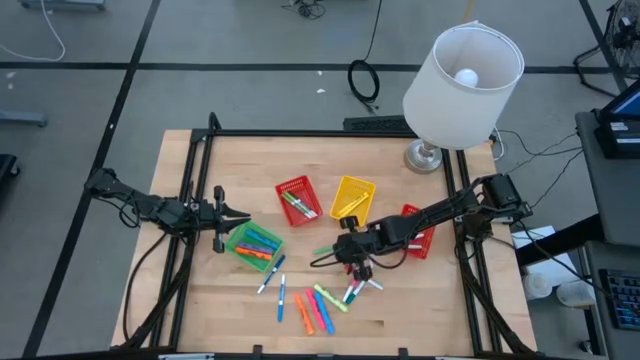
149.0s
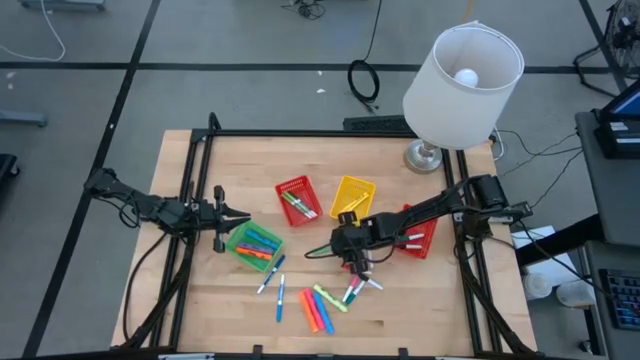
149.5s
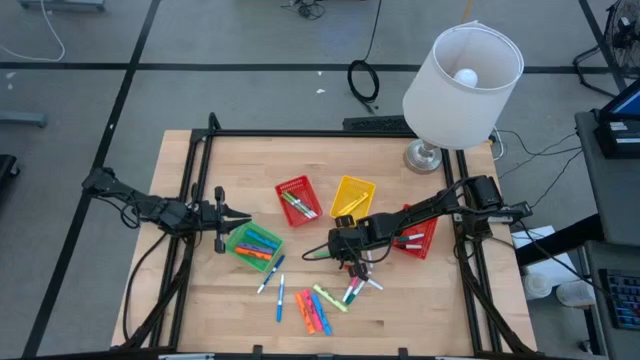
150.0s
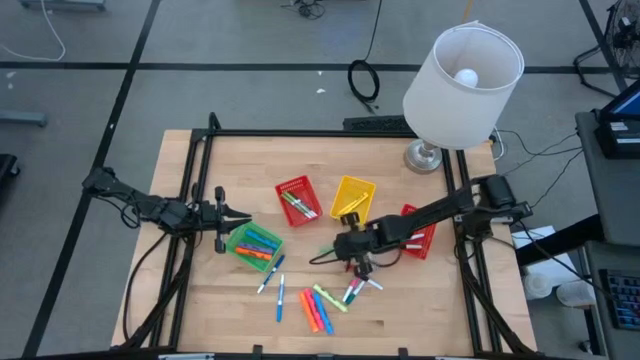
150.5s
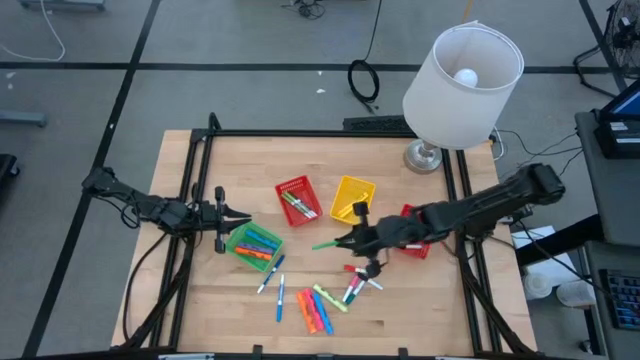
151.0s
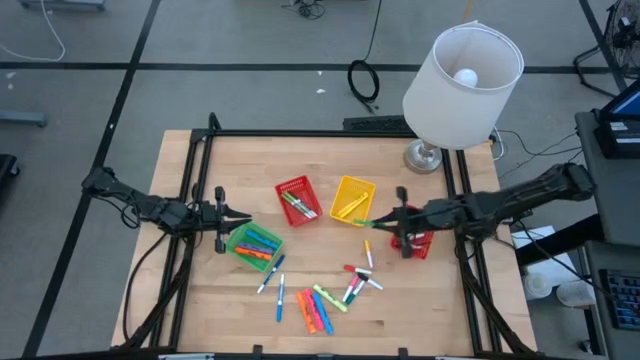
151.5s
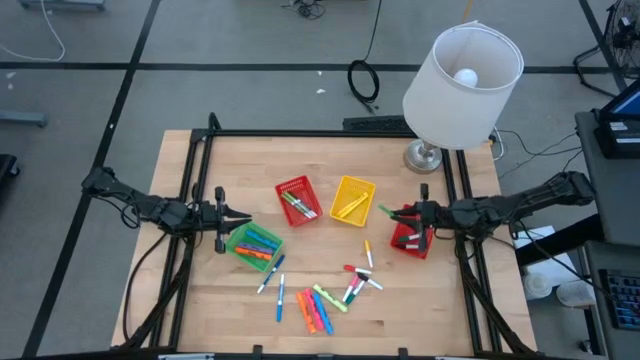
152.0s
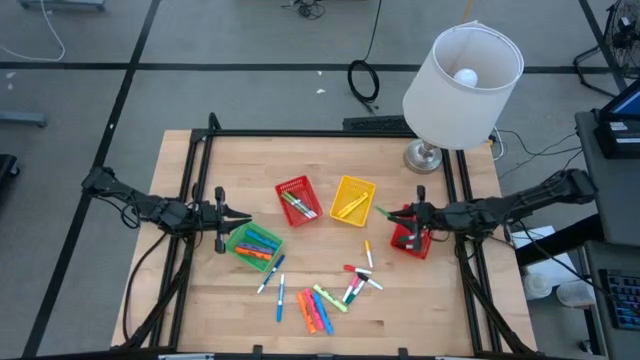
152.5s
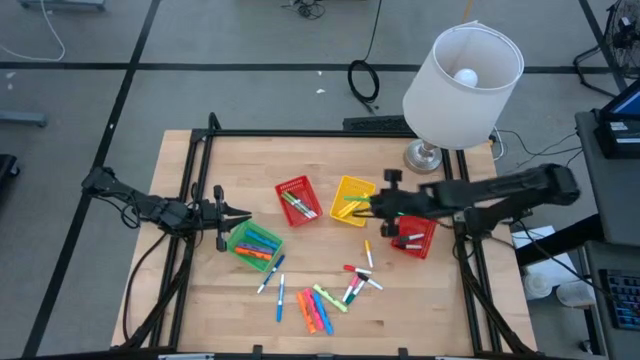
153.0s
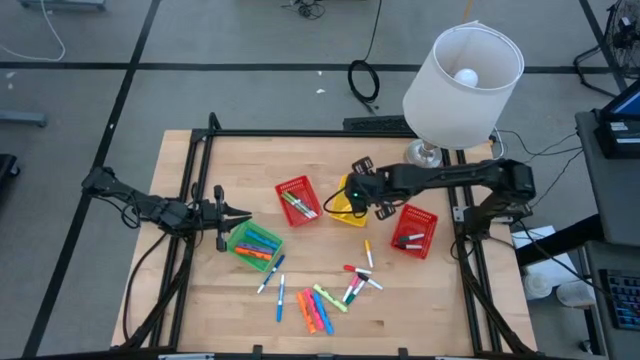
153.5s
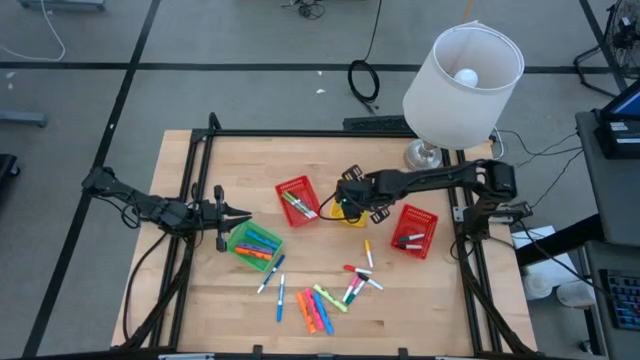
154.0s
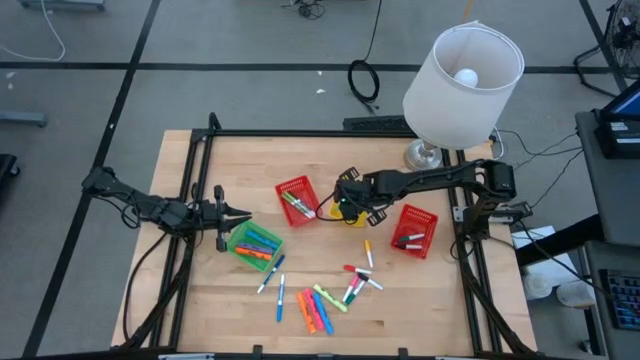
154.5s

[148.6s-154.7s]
Task: Pick & Place Markers
Put the green pen into the yellow bin

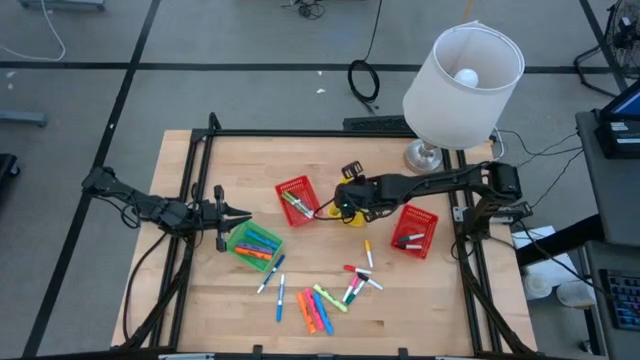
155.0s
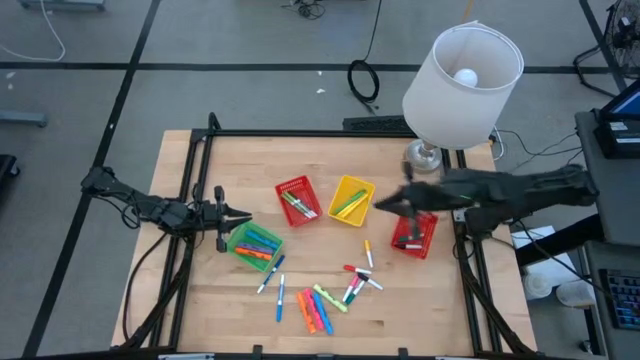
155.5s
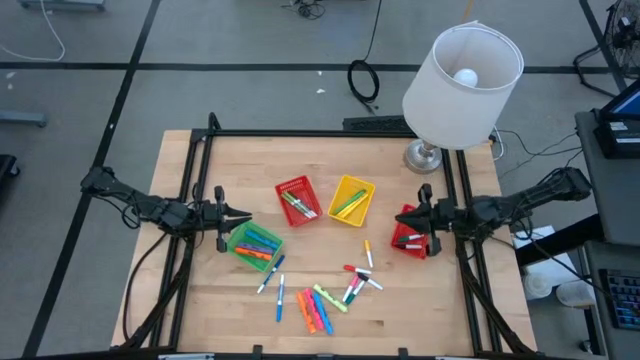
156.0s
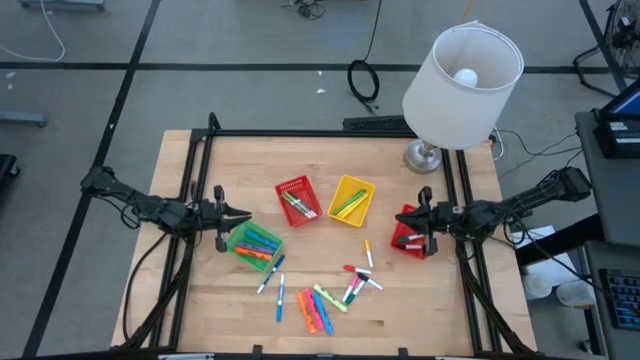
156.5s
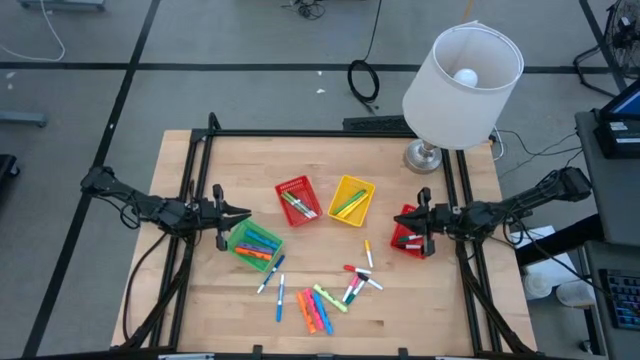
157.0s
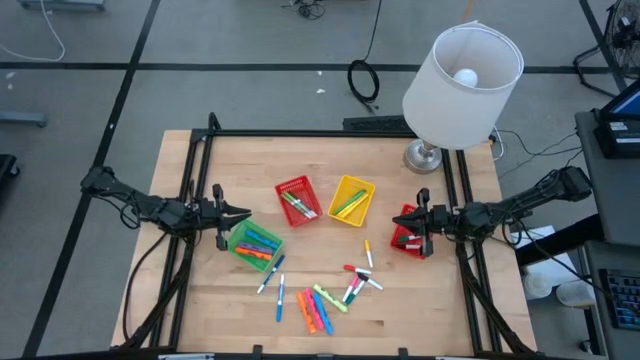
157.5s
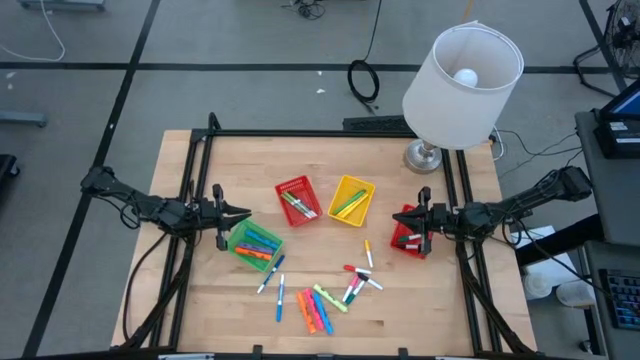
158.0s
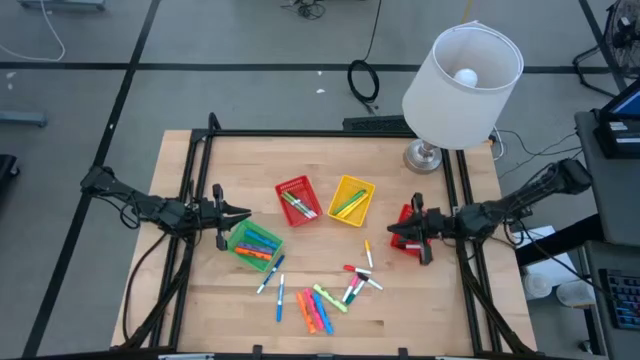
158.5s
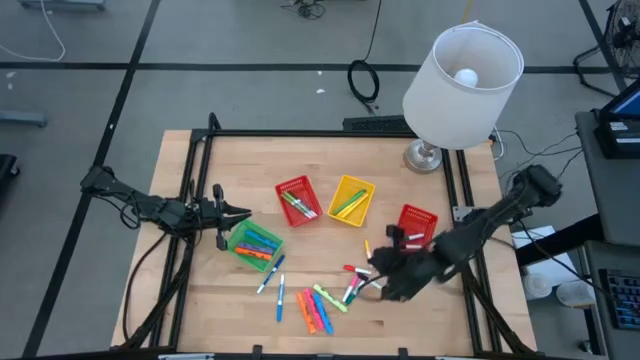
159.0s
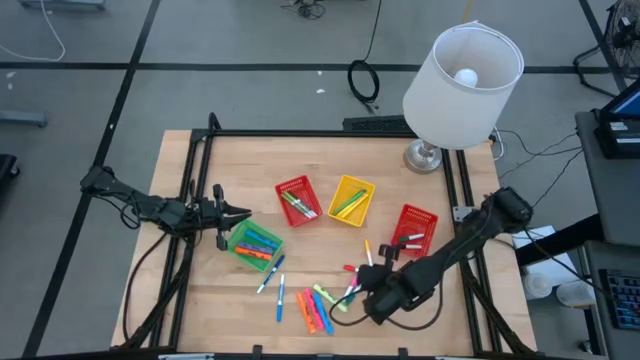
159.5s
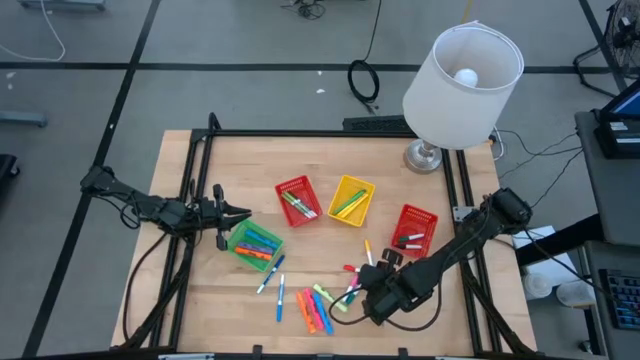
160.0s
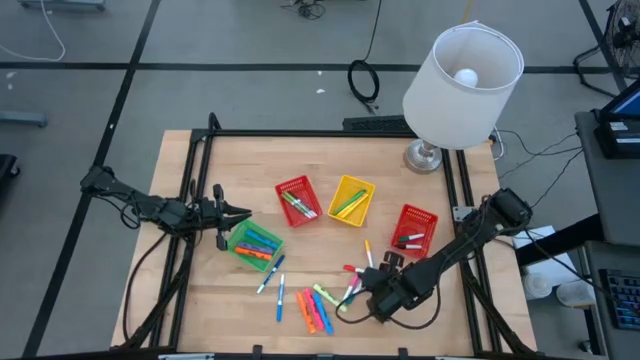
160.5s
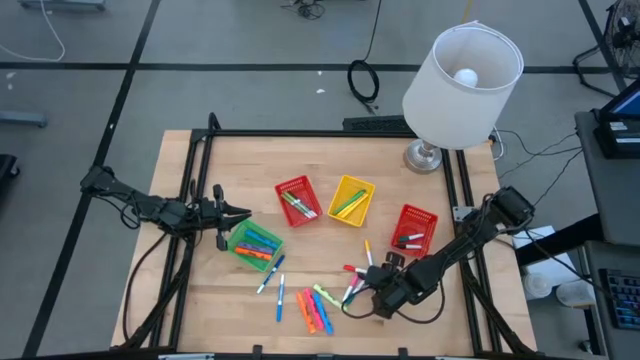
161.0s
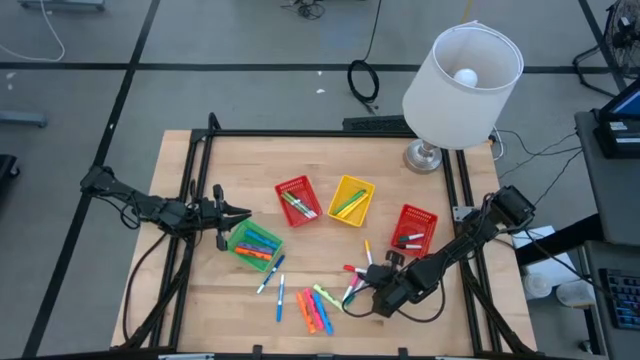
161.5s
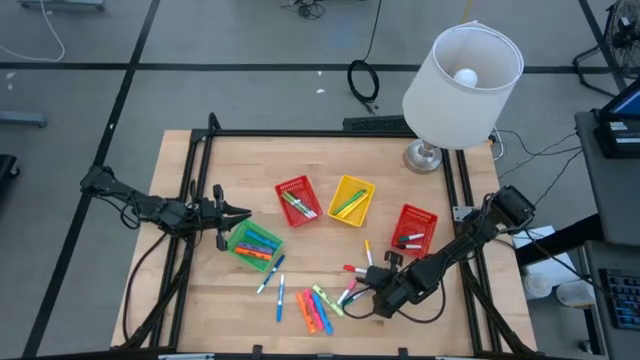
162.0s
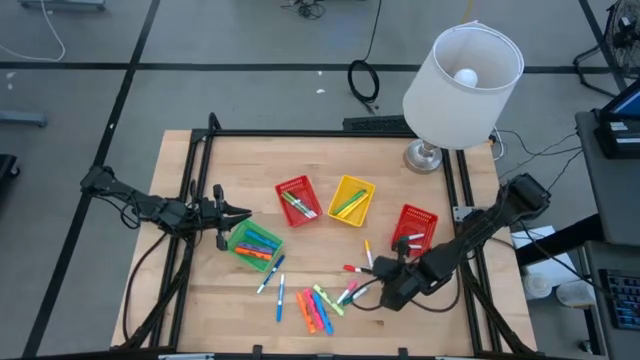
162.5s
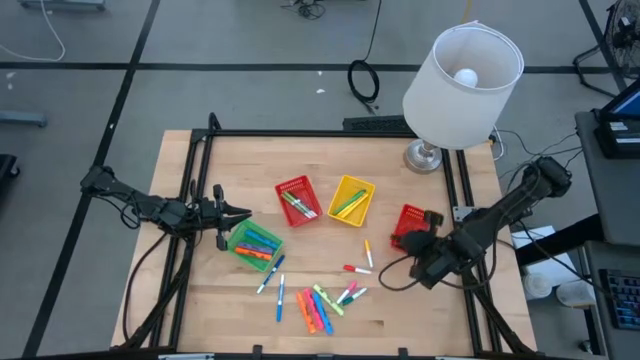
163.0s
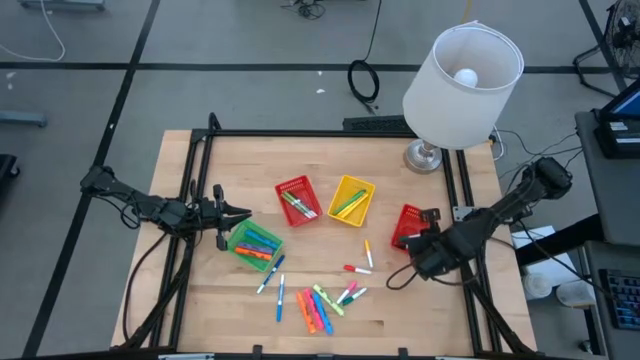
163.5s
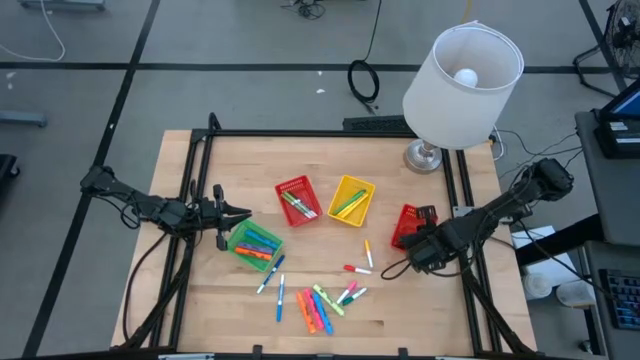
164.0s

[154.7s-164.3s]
Put the black marker into the right red bin

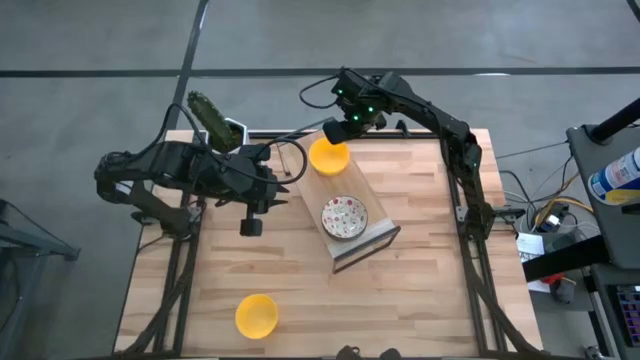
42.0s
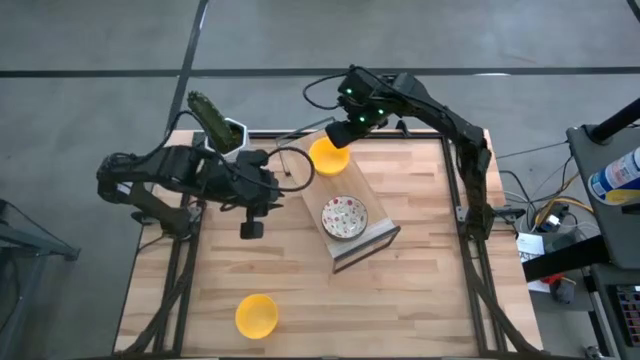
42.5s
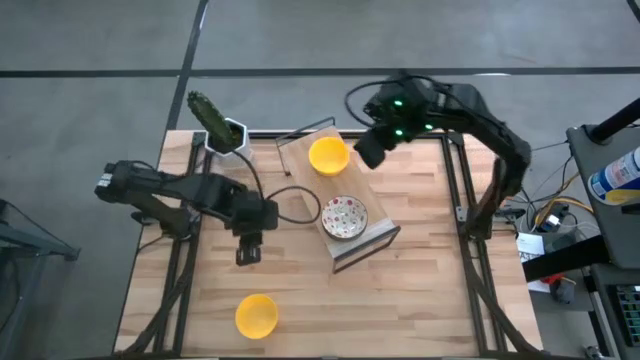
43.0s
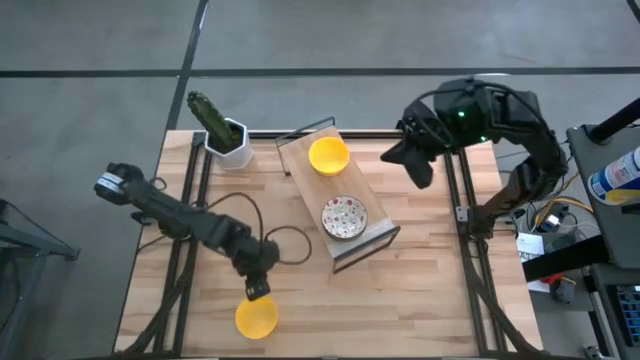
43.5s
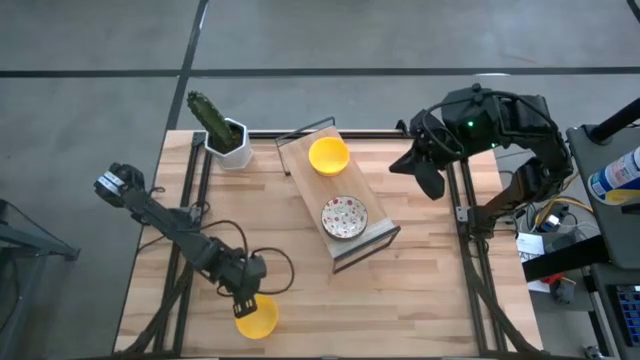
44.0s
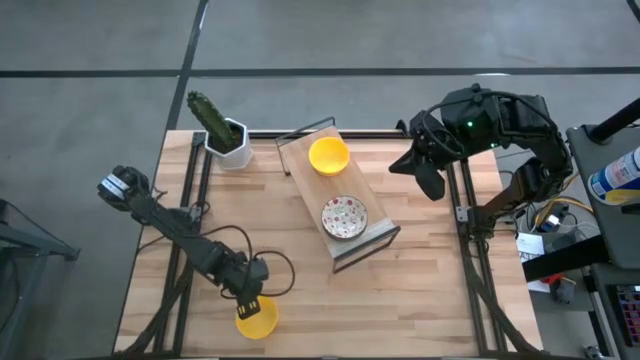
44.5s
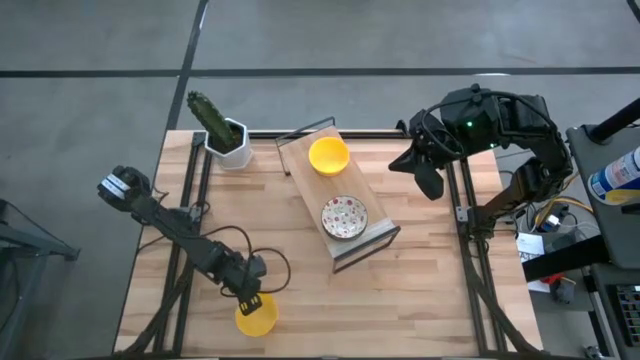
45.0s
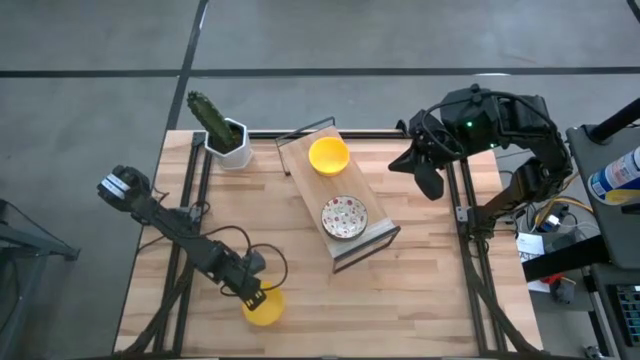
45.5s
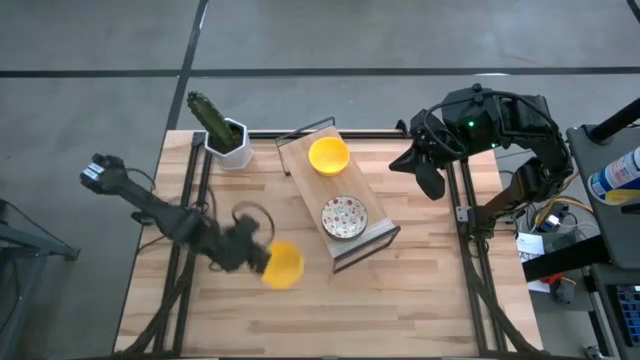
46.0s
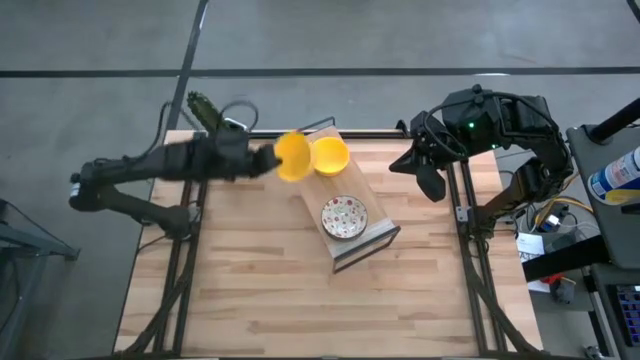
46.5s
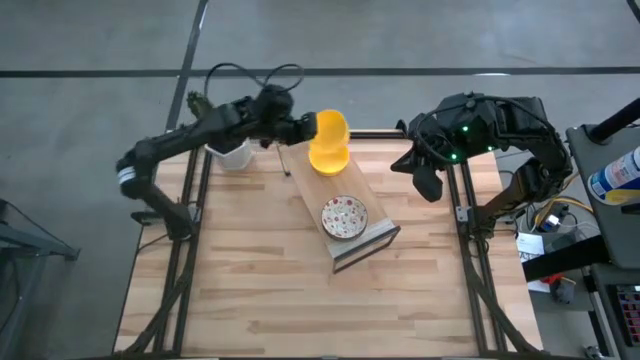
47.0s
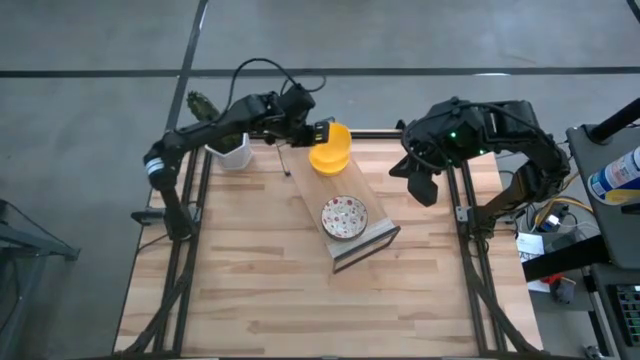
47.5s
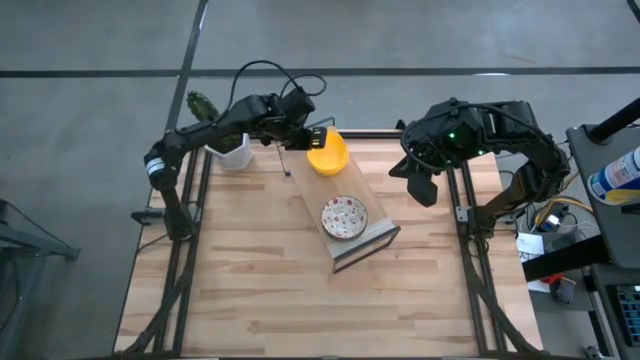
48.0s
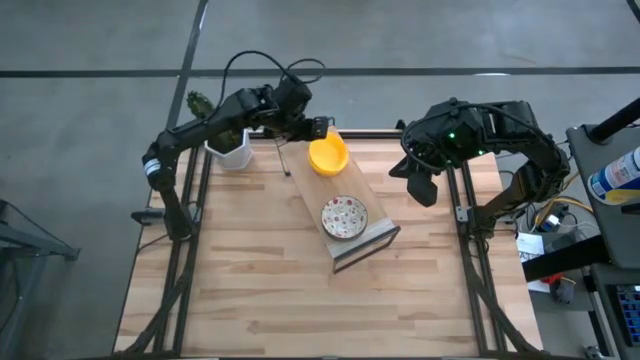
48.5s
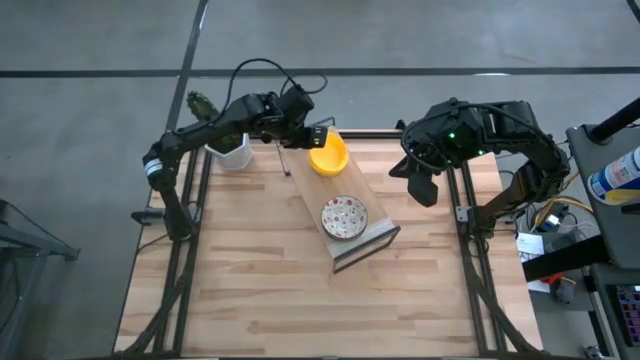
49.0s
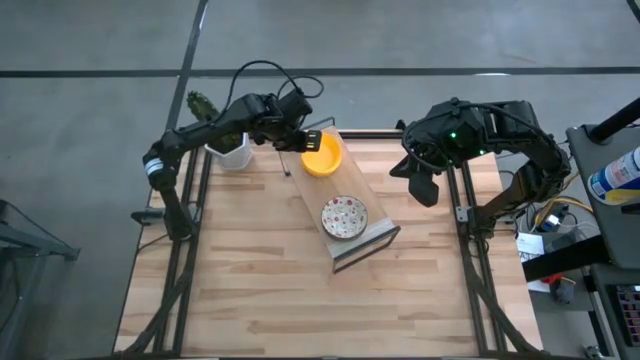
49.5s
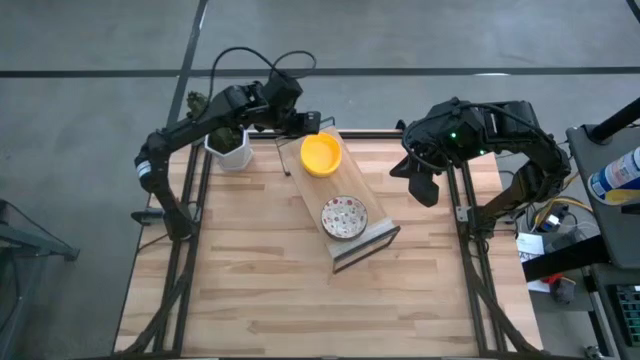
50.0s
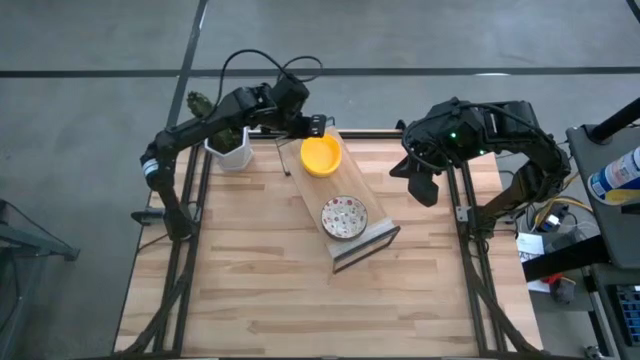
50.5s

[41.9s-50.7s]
Task: Pick & Place Mini bowls
Stack the right yellow bowl on the other yellow bowl on the shelf
